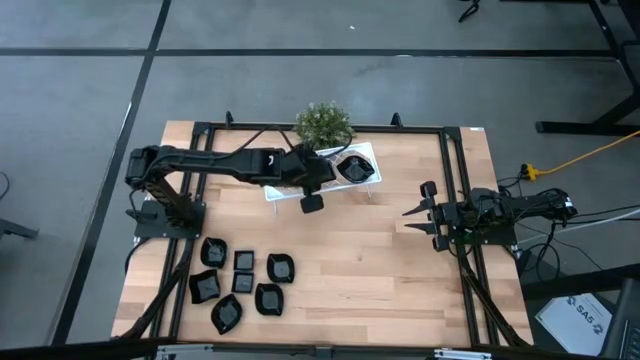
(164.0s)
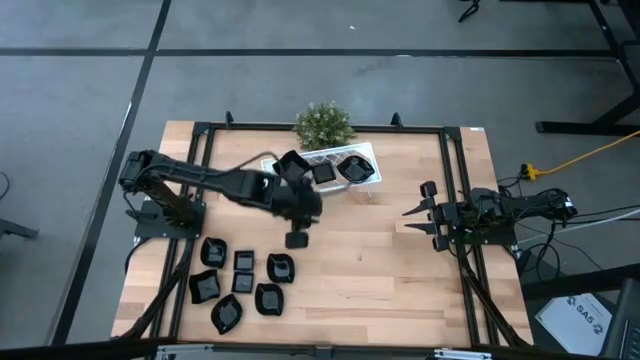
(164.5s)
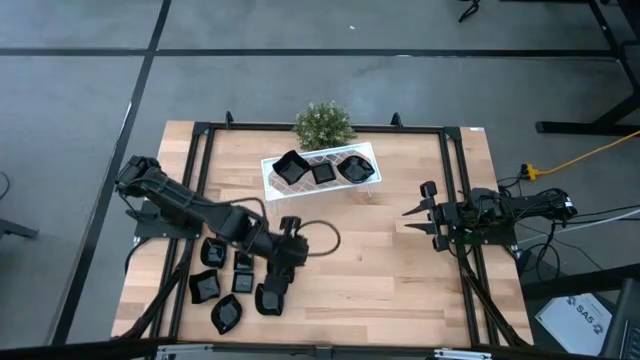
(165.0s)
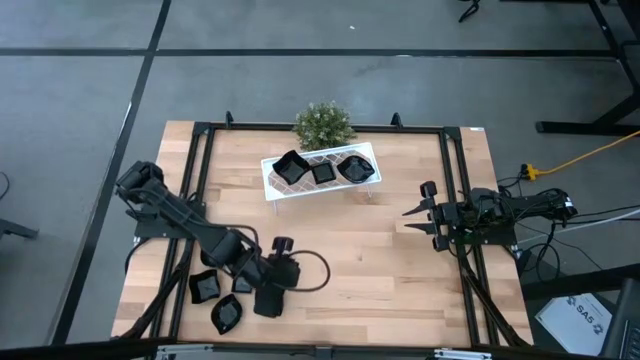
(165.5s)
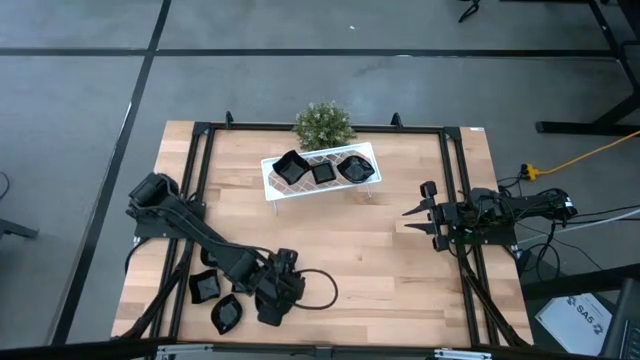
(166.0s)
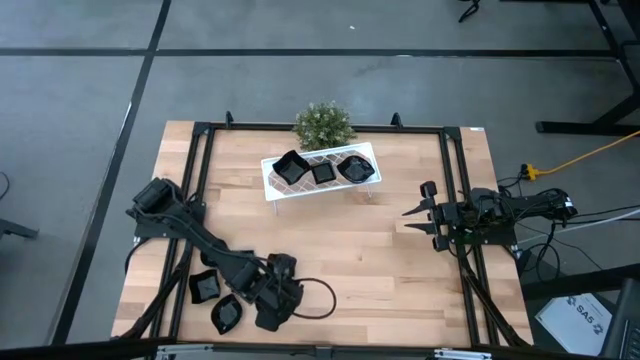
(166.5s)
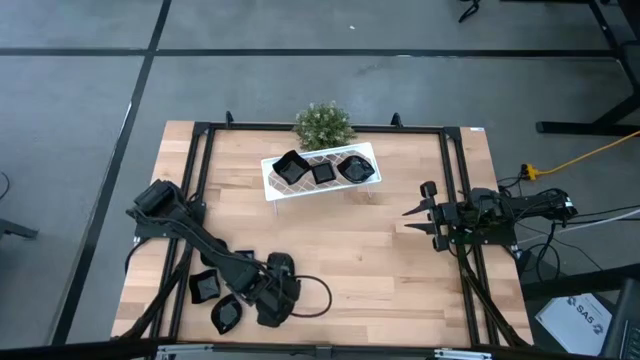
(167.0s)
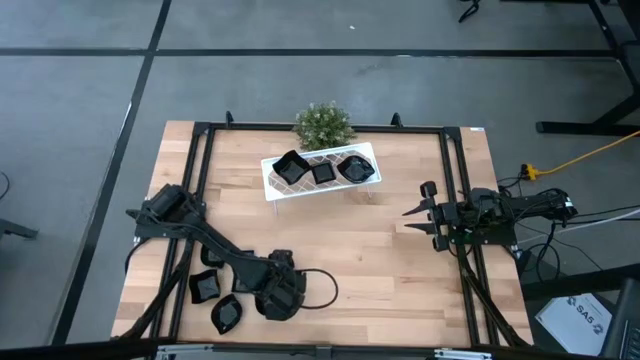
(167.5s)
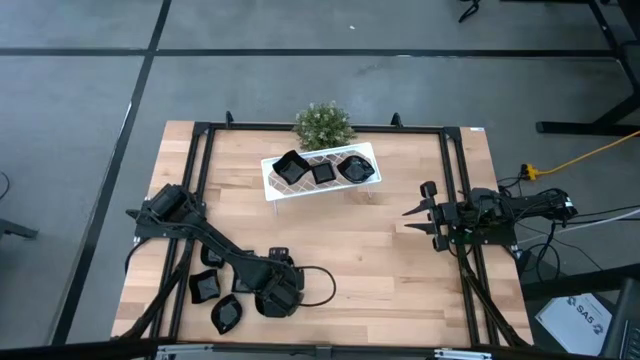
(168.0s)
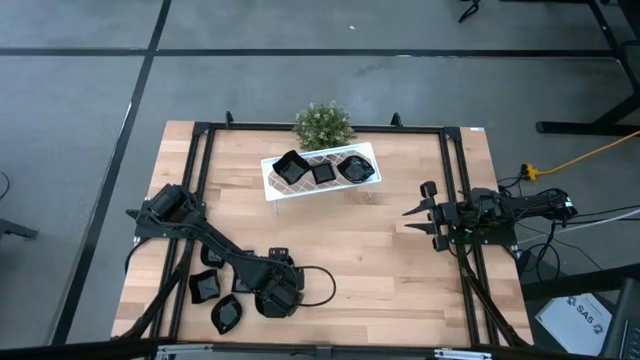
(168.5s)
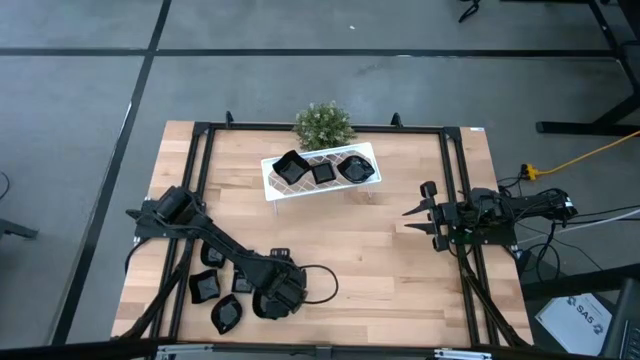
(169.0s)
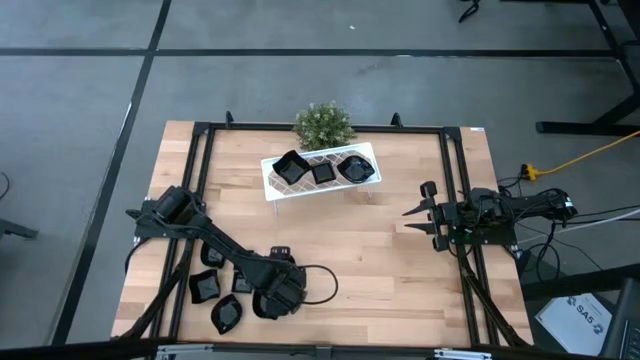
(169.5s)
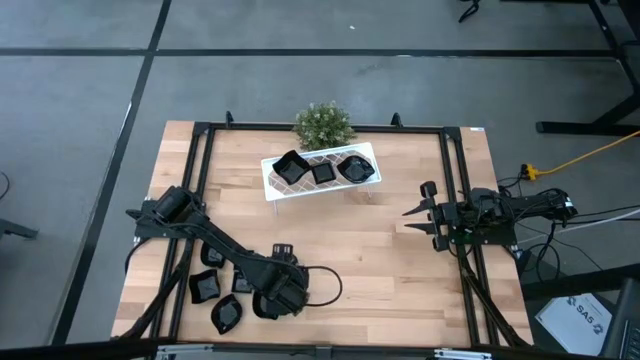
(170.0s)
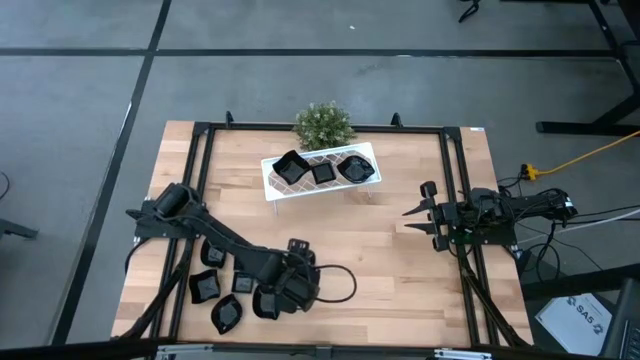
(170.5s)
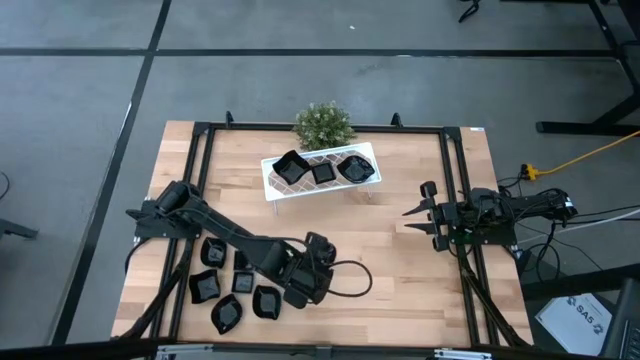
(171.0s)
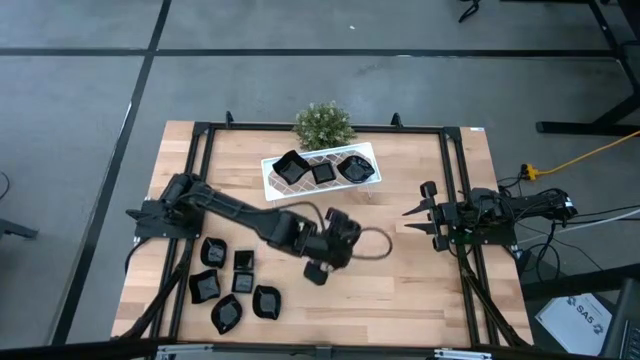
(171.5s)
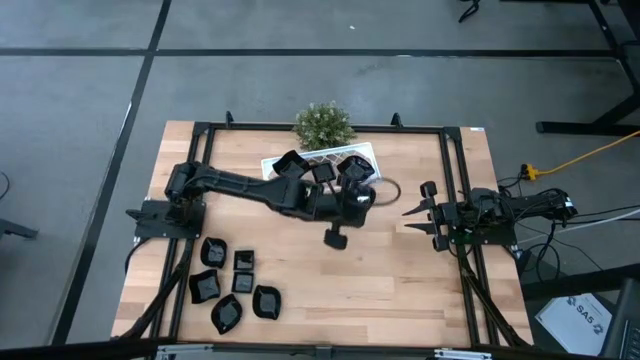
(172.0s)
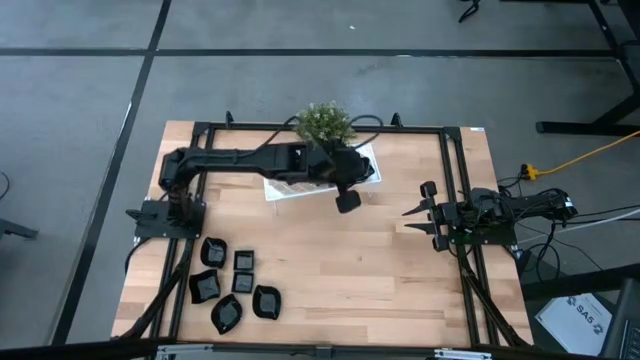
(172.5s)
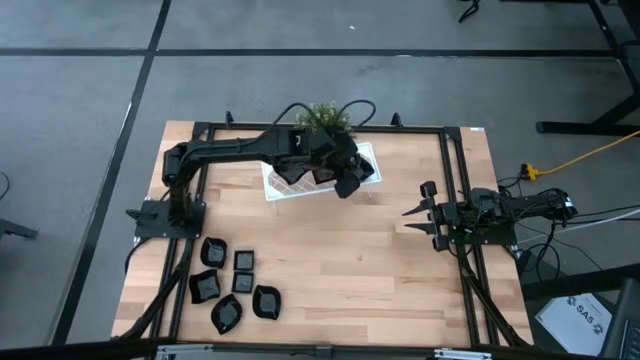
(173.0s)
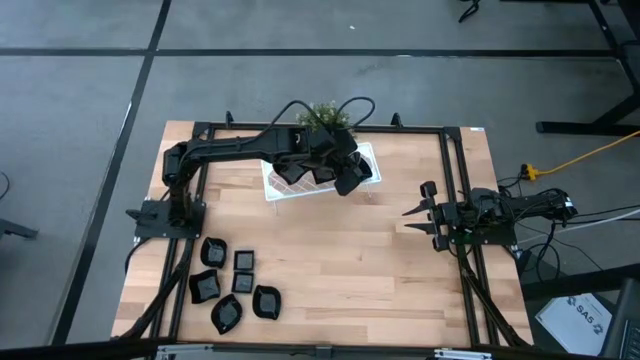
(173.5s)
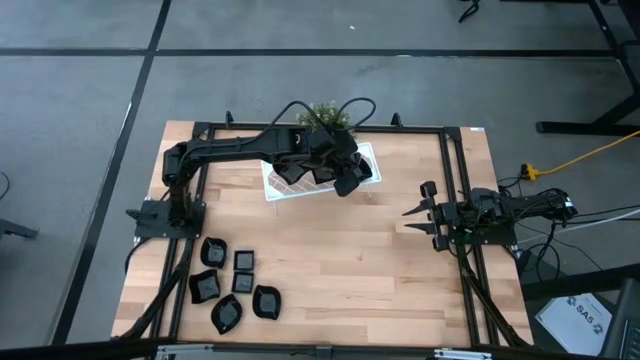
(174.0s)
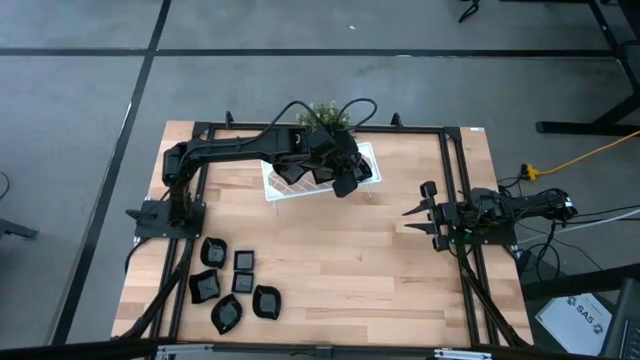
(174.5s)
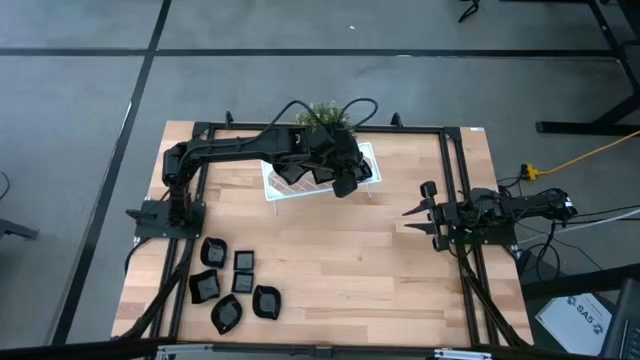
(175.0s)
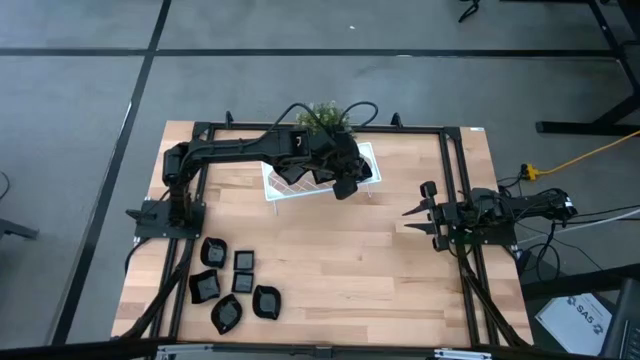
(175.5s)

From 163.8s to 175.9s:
Task: Pick & Place Mini shaped plates
Stack the leaf shaped plate on top of the leaf shaped plate on the shelf

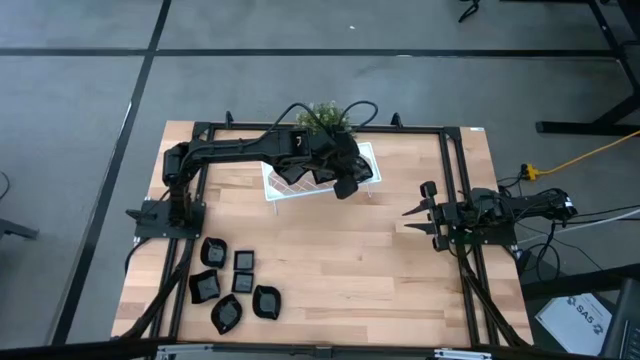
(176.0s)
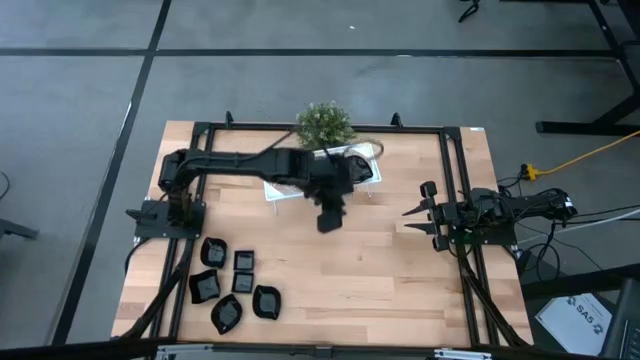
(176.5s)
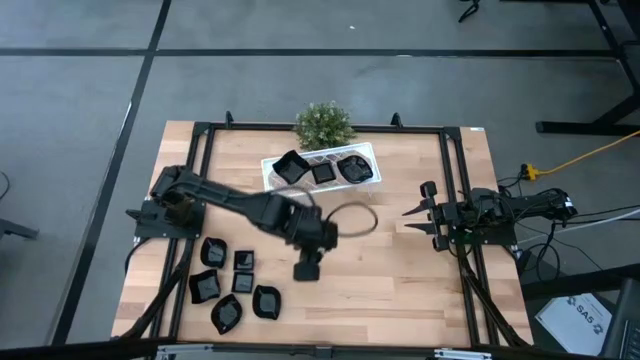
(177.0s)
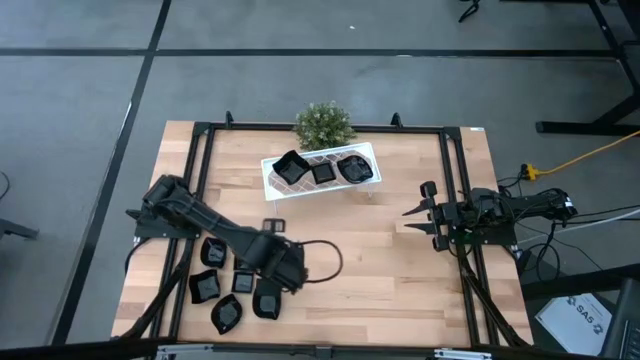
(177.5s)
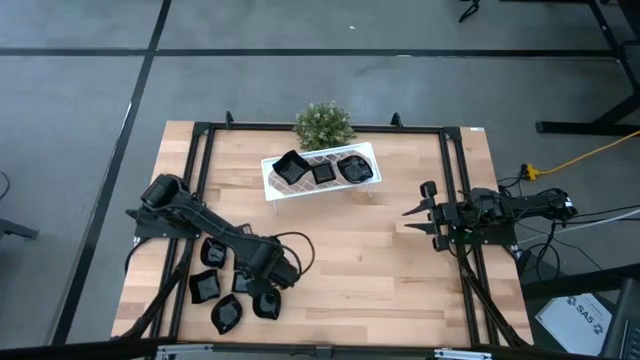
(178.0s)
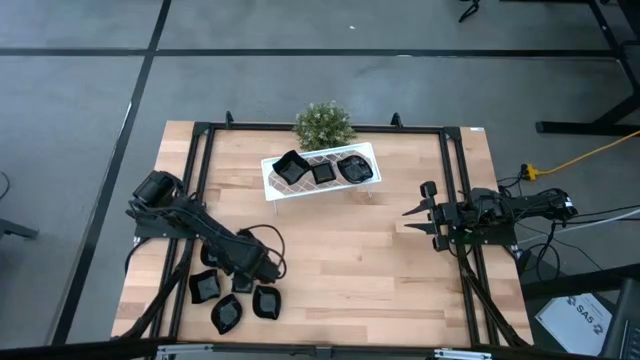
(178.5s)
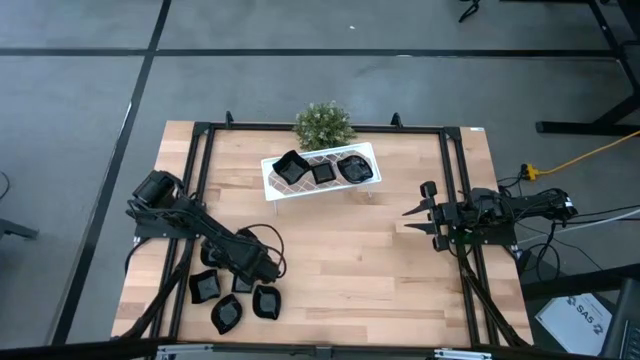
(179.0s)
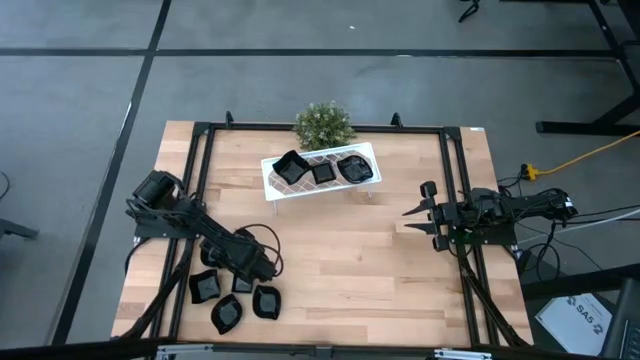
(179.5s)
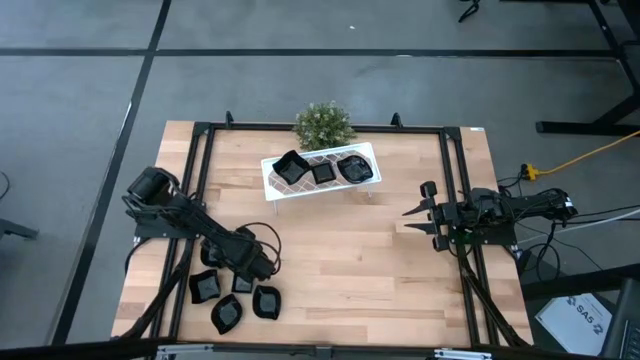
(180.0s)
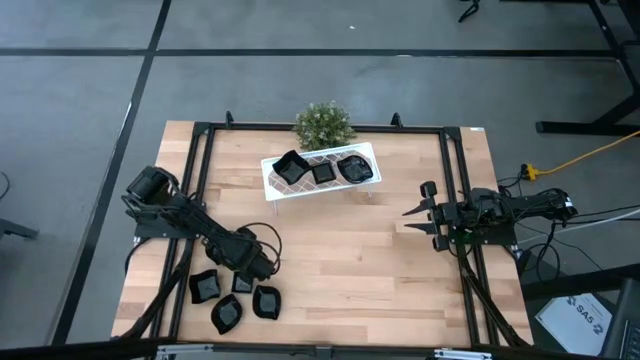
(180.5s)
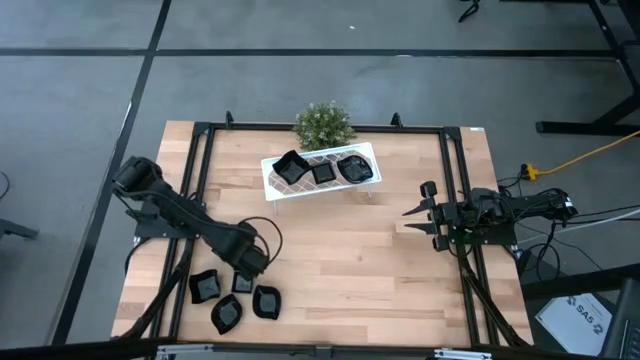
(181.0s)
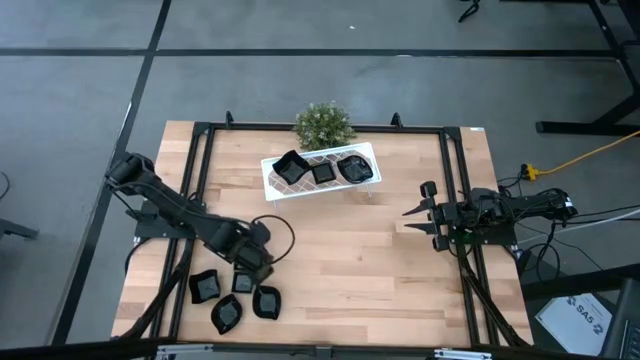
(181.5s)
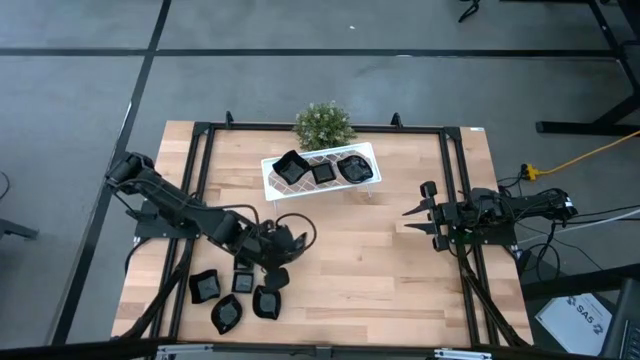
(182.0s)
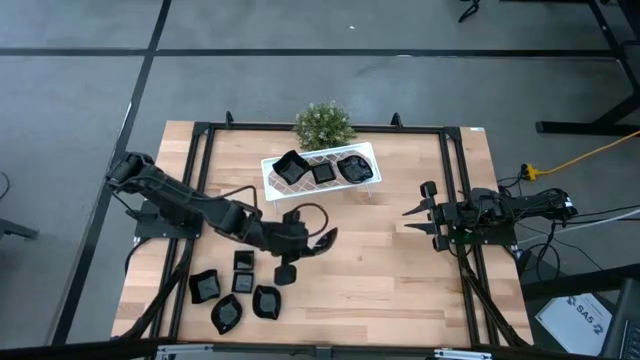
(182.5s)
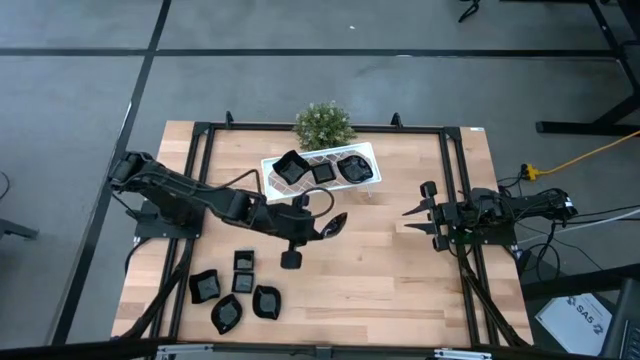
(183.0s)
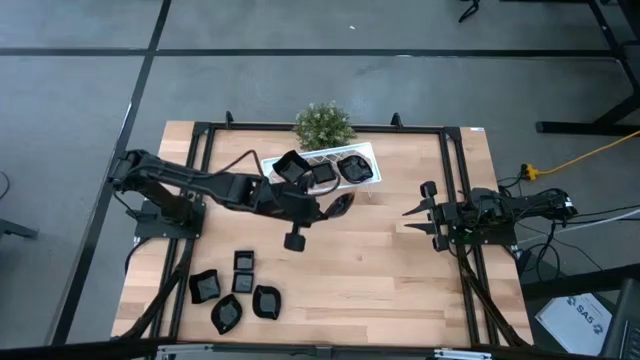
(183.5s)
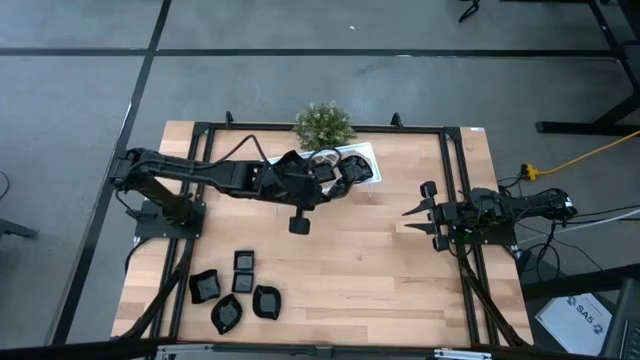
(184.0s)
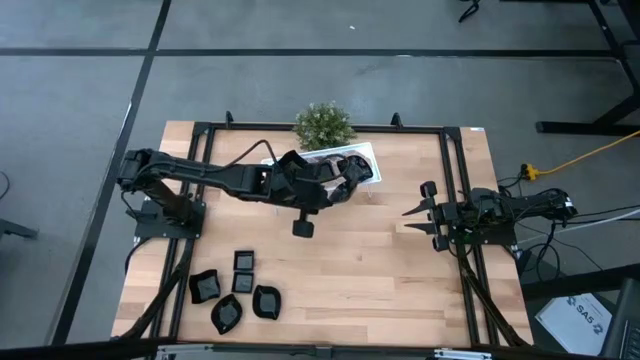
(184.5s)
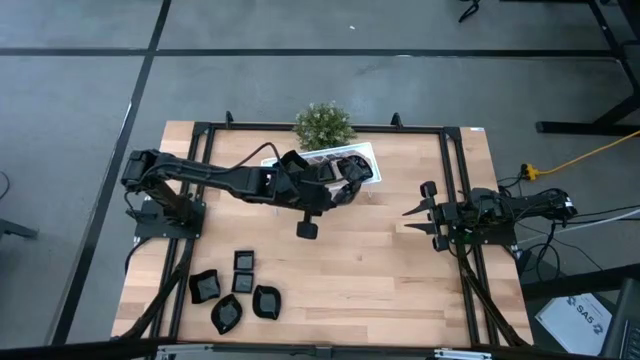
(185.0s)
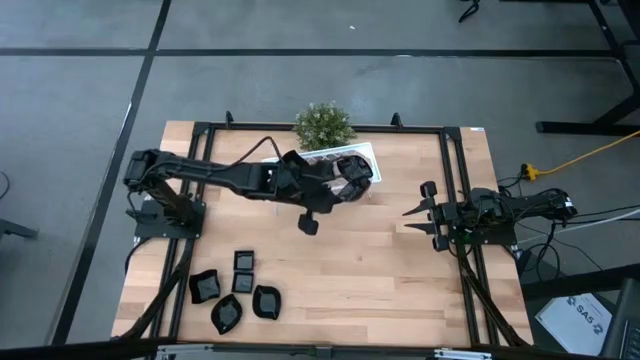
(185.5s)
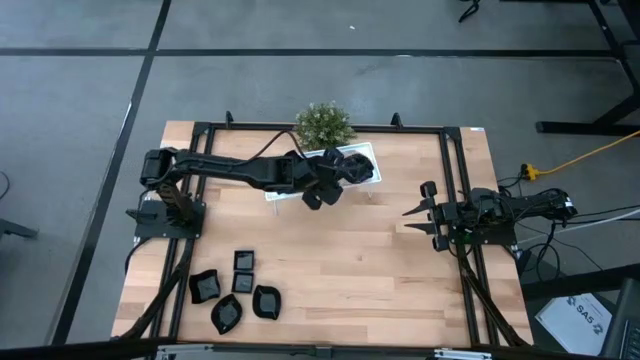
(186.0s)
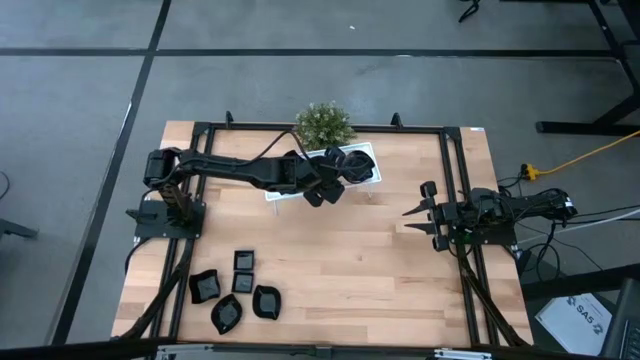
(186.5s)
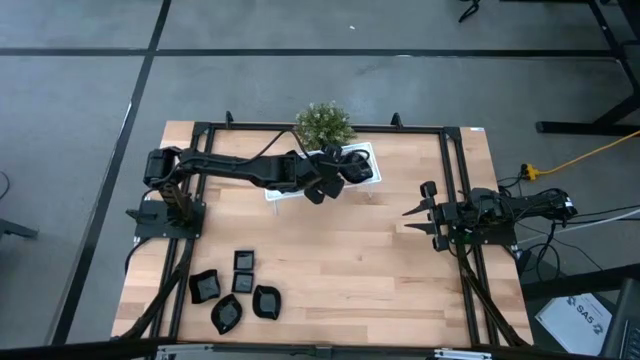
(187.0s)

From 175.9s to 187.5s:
Stack the leaf shaped plate on top of the leaf shaped plate on the shelf
